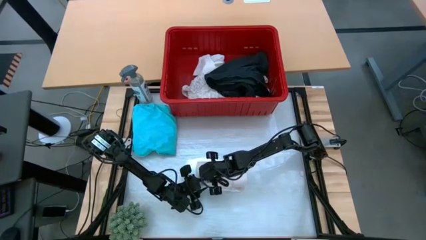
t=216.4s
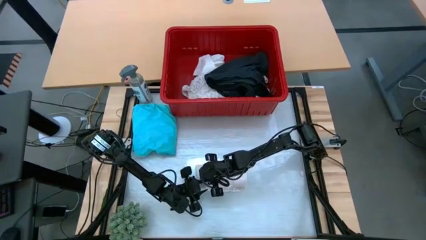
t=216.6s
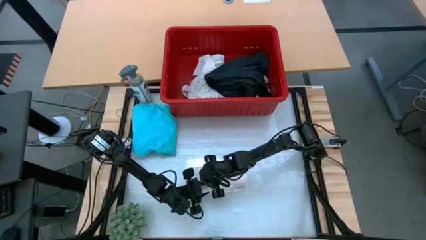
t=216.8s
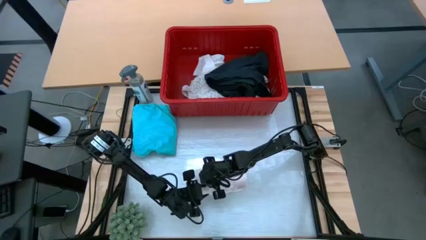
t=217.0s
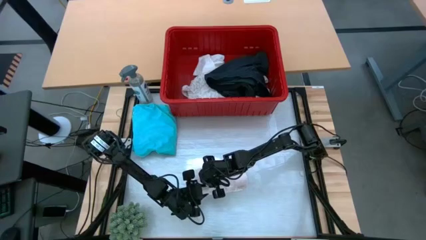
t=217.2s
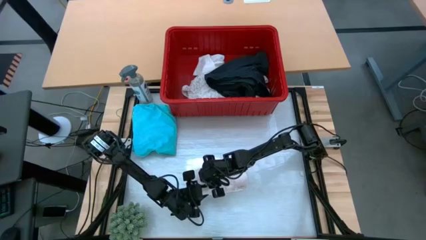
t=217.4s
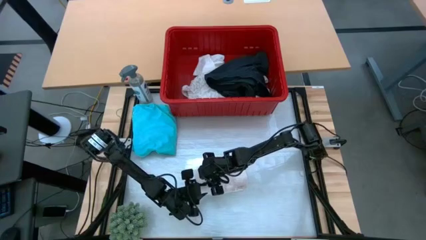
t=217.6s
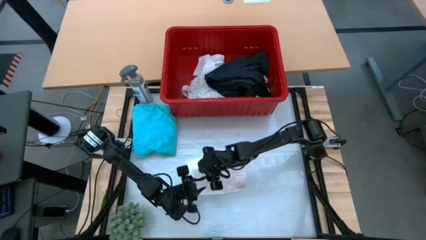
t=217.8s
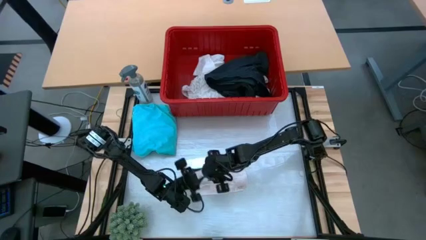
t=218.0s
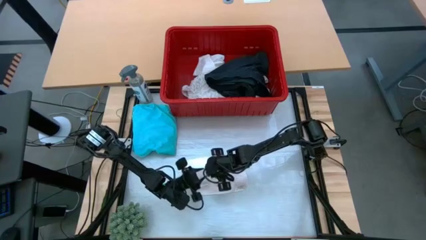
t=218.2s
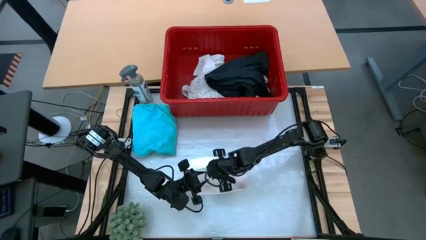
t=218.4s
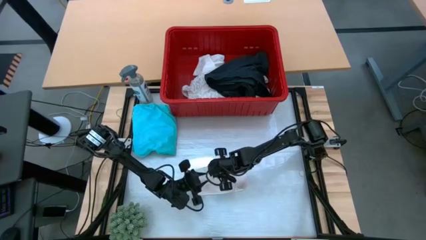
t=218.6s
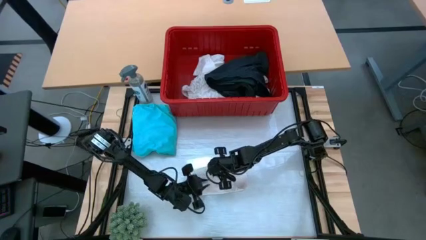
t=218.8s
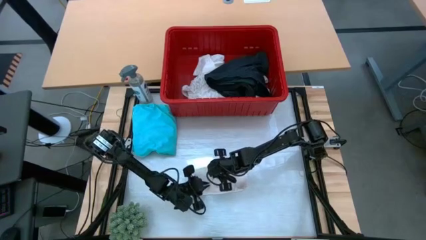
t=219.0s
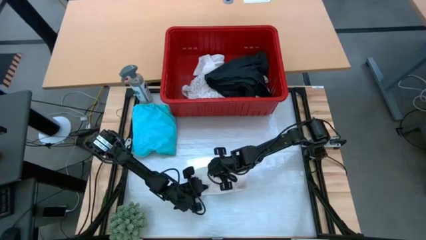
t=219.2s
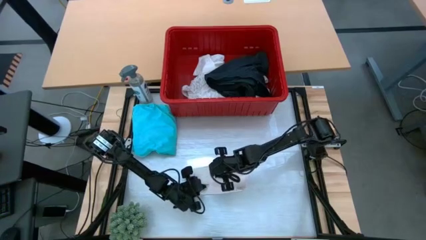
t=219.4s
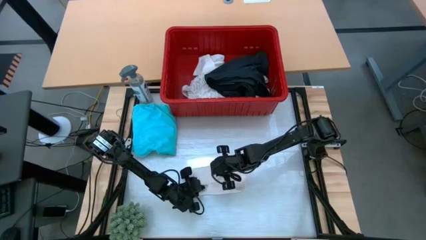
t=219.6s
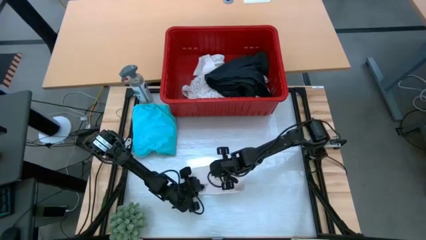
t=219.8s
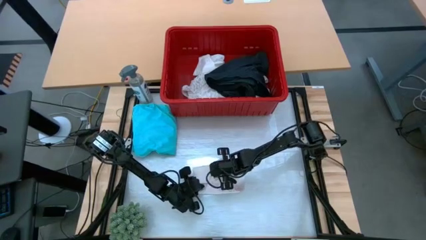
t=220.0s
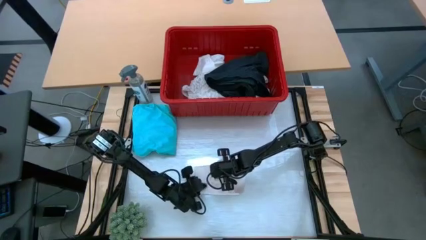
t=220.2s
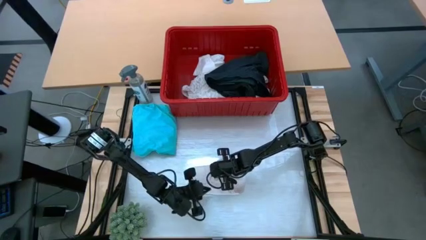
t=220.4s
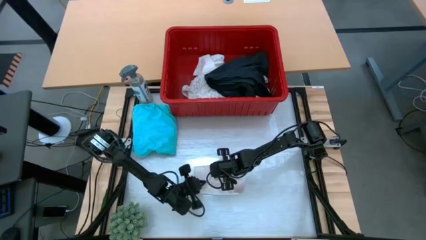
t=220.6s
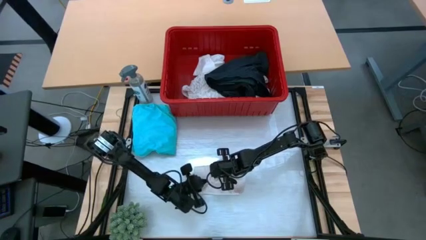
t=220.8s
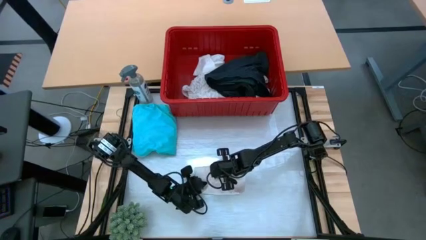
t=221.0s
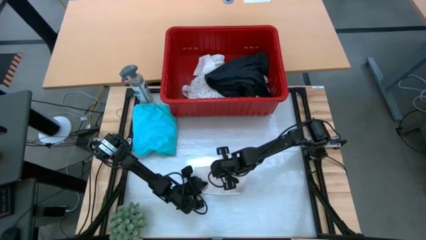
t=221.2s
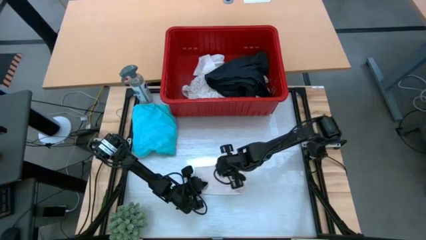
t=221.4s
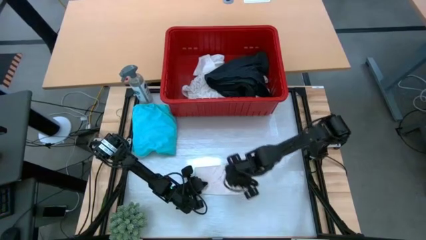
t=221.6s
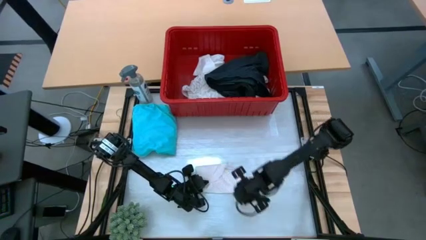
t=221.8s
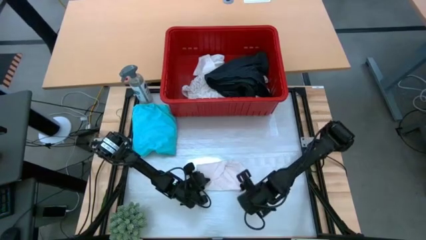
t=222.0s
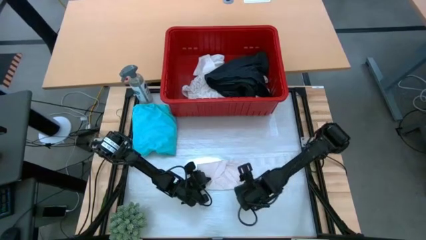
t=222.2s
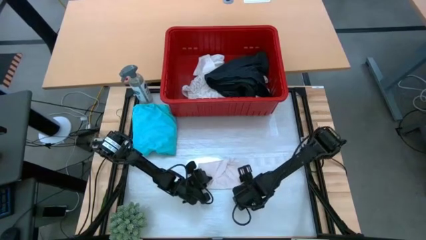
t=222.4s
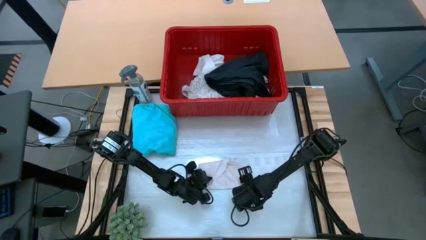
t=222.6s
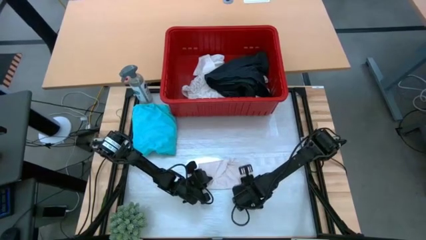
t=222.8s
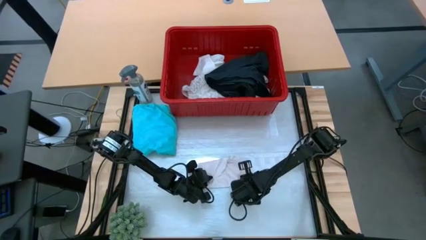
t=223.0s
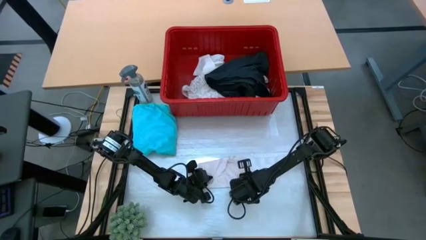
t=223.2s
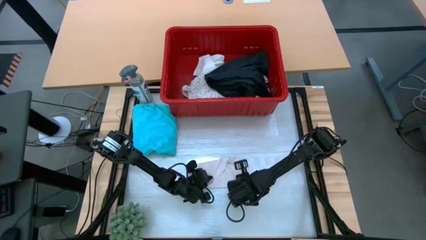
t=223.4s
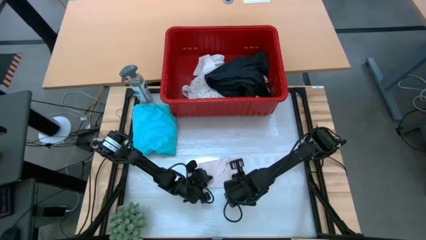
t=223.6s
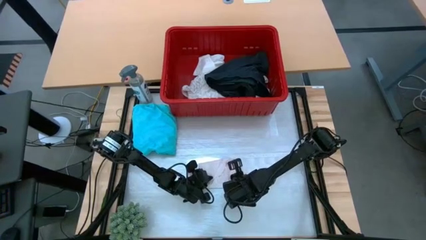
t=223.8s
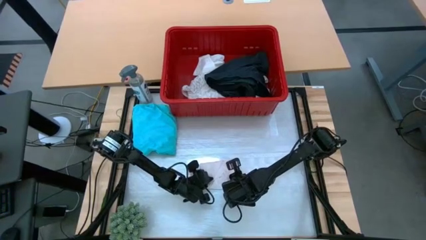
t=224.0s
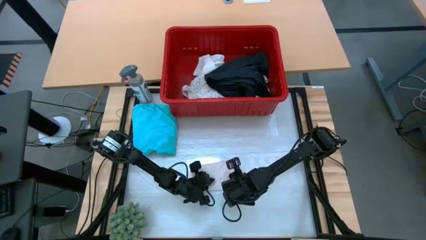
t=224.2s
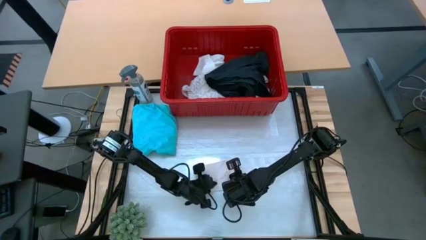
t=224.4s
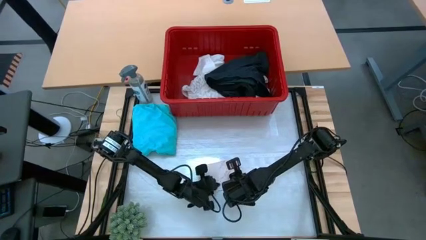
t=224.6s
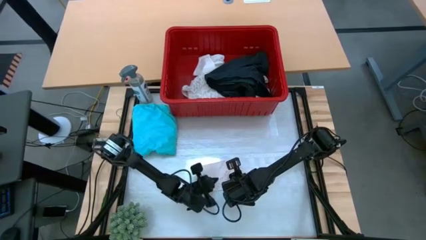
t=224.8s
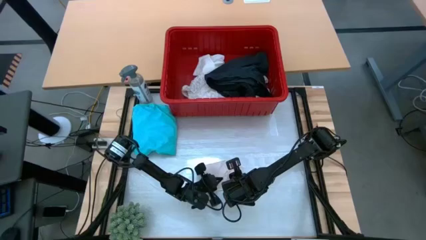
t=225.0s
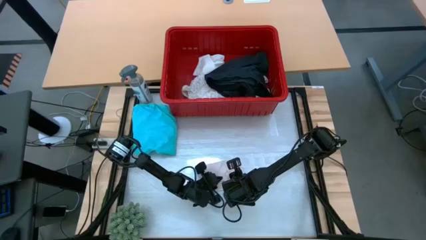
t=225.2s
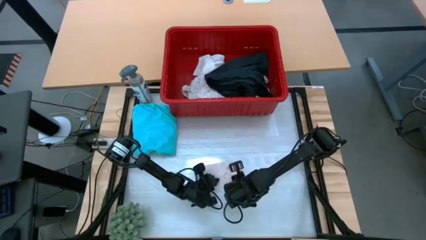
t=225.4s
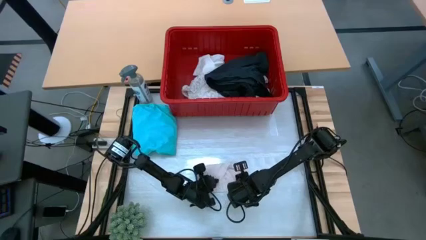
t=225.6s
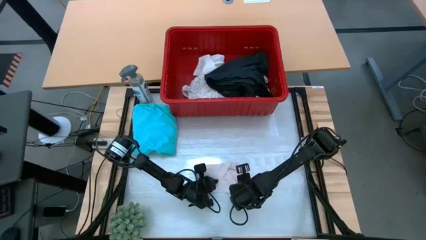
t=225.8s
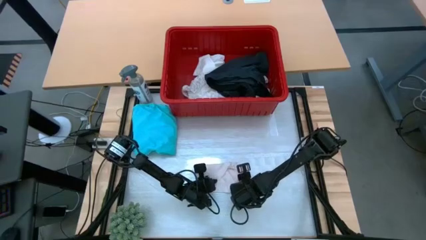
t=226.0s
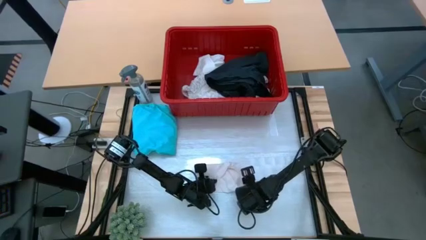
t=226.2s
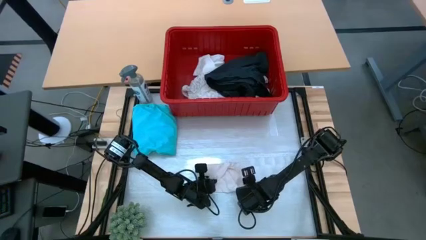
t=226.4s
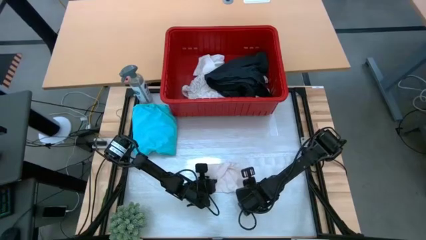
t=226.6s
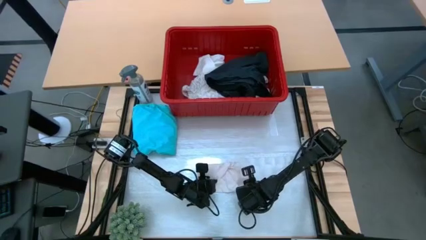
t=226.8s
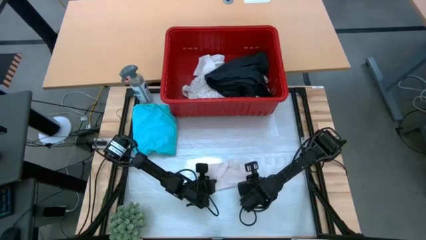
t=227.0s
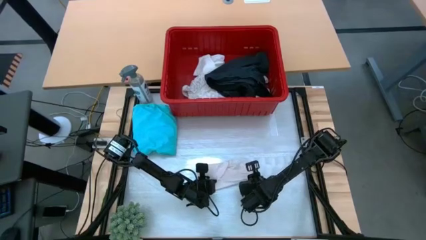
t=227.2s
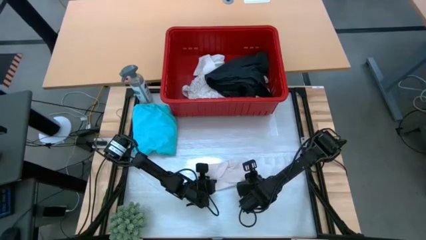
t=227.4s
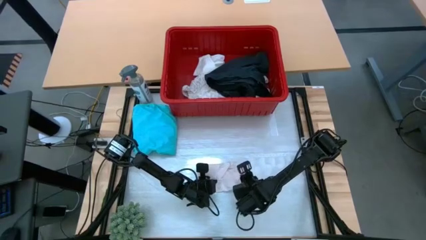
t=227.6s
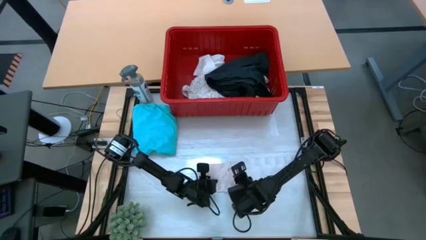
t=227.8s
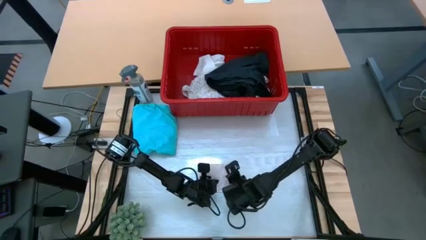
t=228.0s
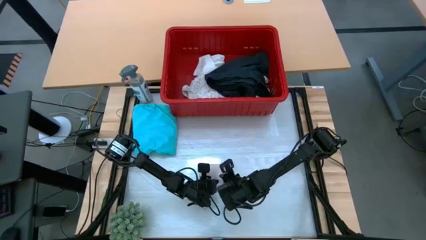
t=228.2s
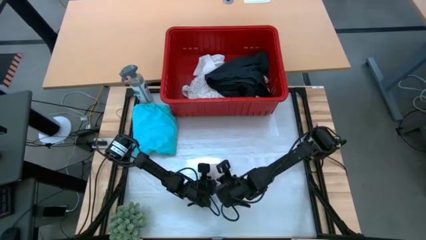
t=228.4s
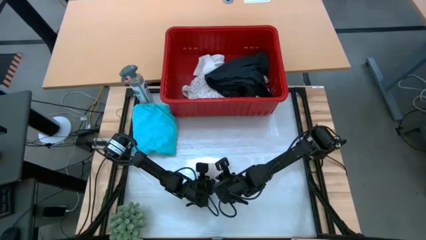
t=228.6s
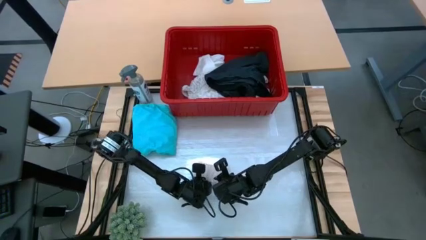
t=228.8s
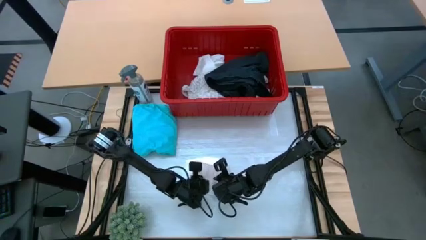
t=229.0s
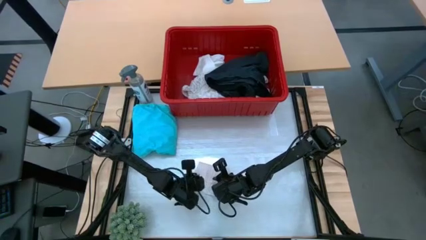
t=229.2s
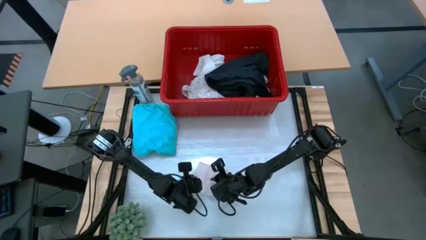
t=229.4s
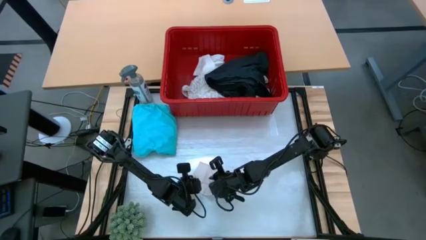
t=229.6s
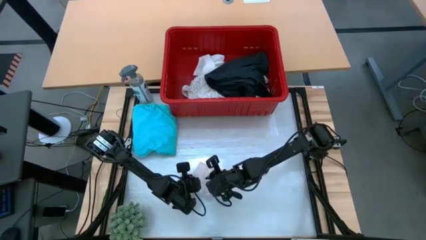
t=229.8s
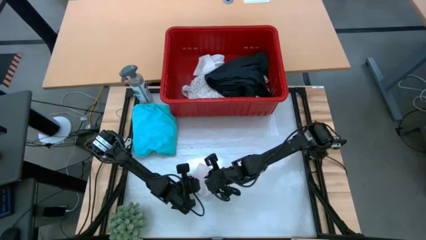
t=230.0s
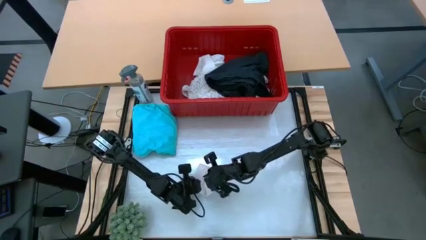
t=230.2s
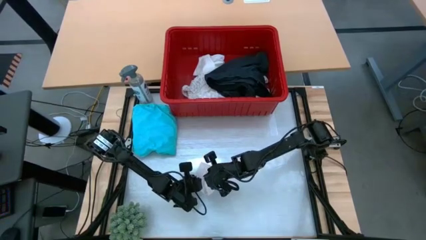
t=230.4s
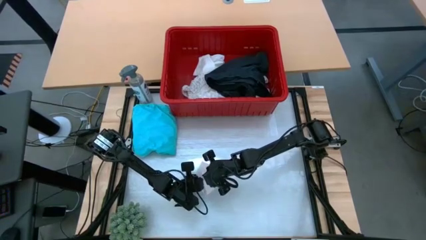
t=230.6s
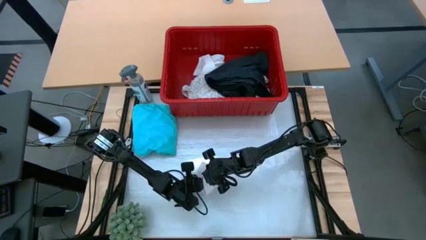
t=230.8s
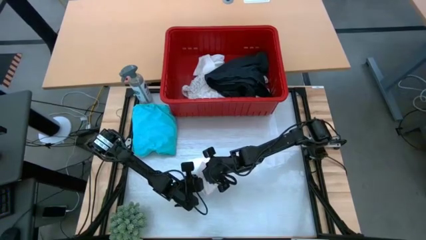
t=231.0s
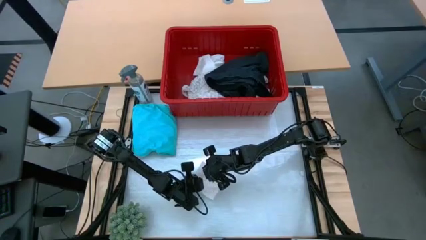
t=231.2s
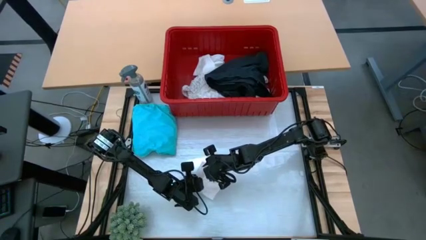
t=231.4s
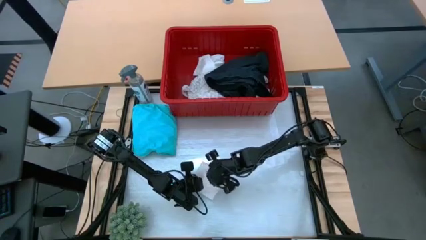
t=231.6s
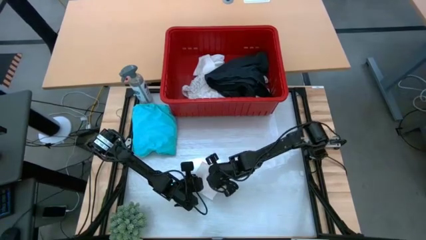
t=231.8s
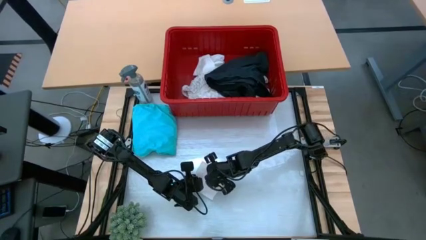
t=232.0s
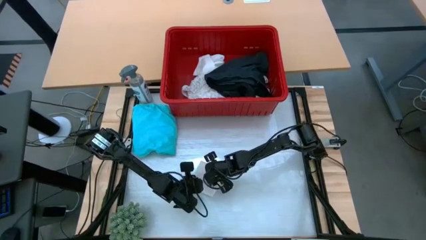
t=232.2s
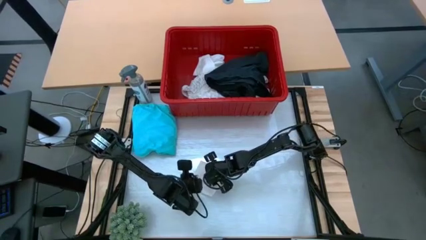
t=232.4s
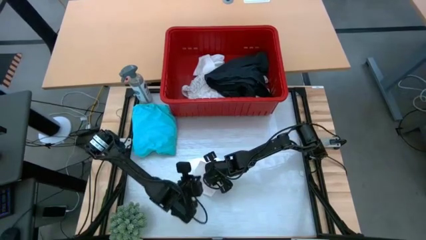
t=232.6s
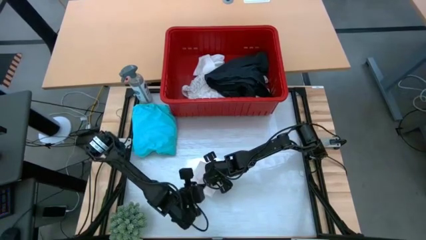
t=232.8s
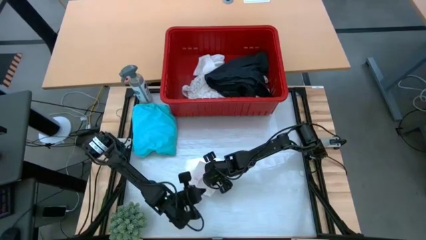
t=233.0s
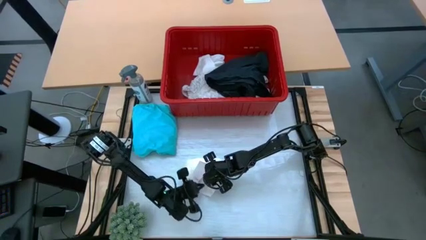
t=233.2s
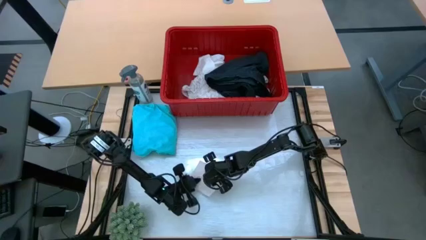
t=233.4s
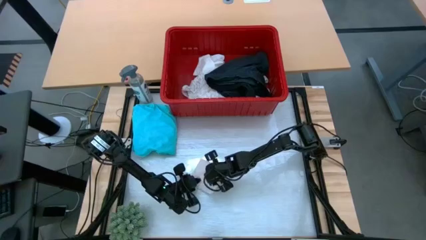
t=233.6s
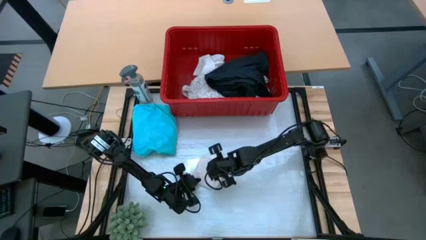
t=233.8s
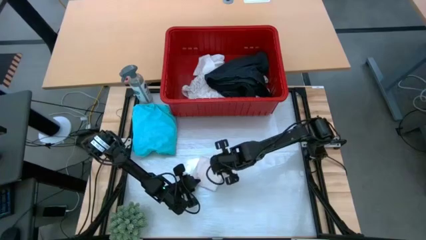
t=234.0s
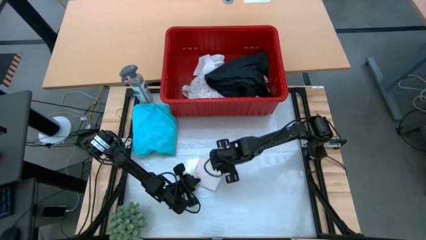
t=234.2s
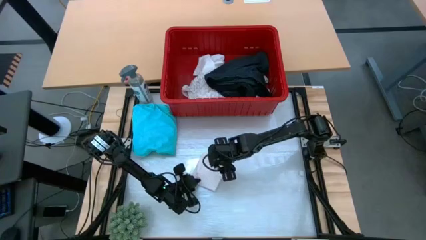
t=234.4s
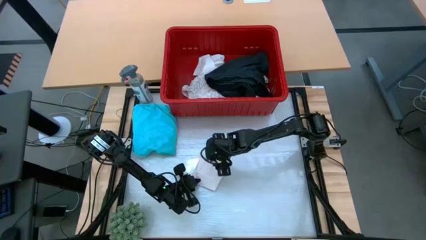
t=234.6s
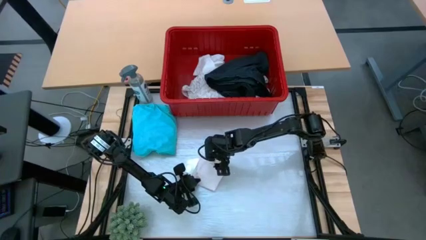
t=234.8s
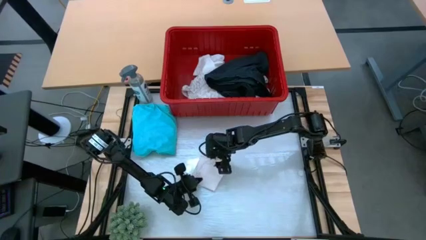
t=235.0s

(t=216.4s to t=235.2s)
Task: Fold laundry
Fold the white underwear
